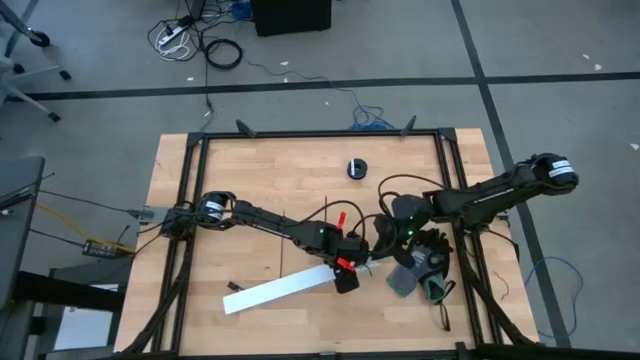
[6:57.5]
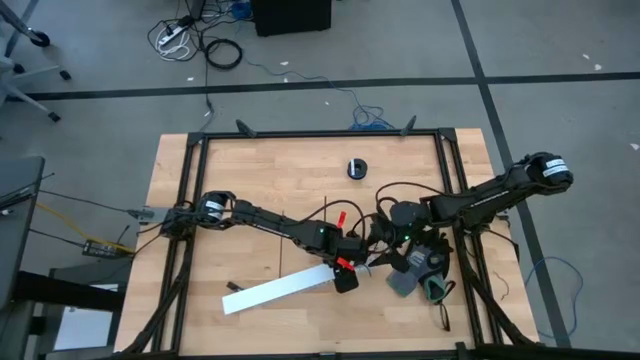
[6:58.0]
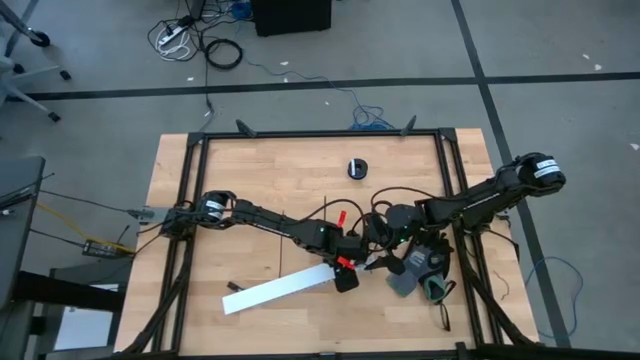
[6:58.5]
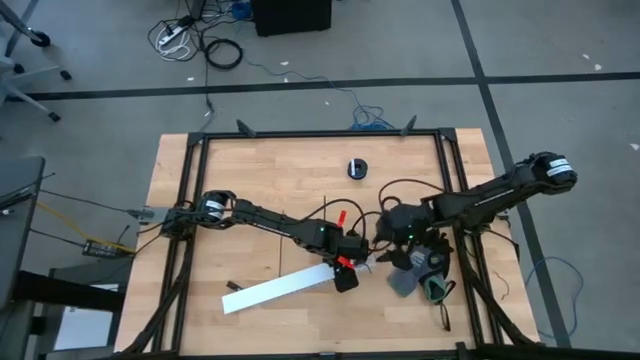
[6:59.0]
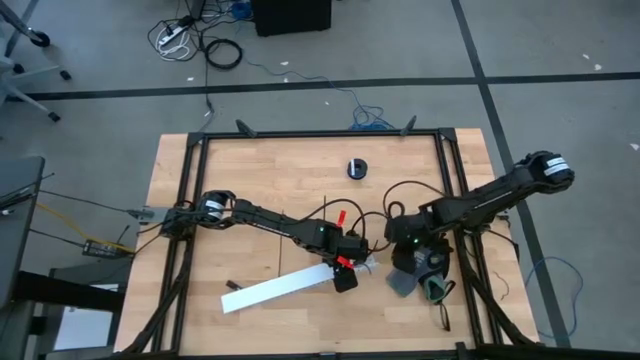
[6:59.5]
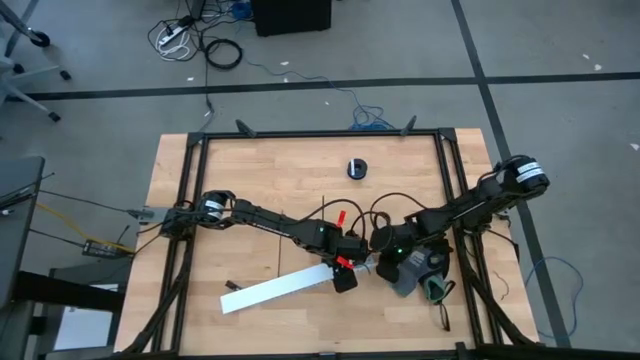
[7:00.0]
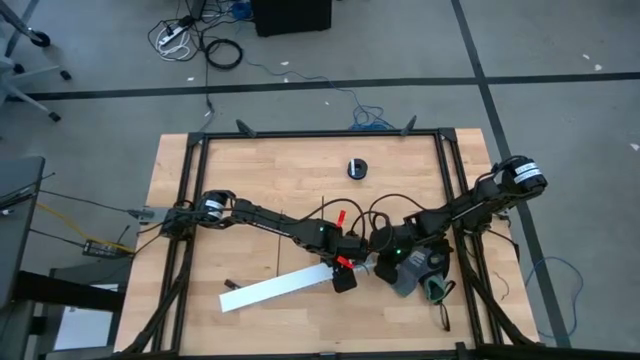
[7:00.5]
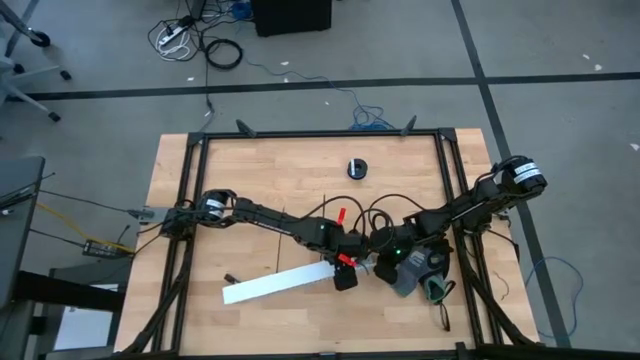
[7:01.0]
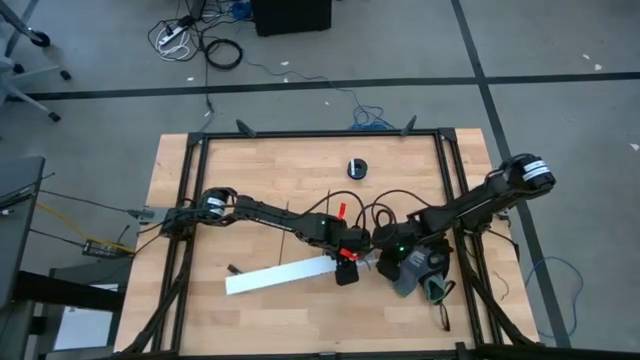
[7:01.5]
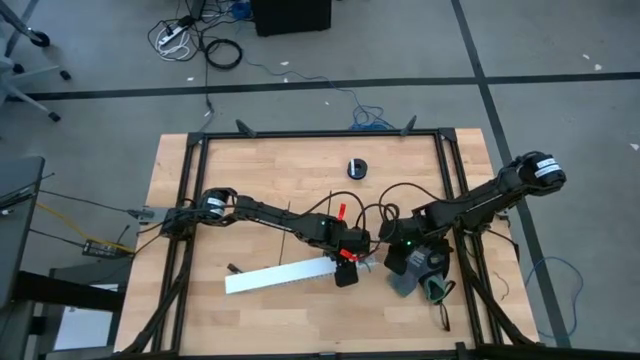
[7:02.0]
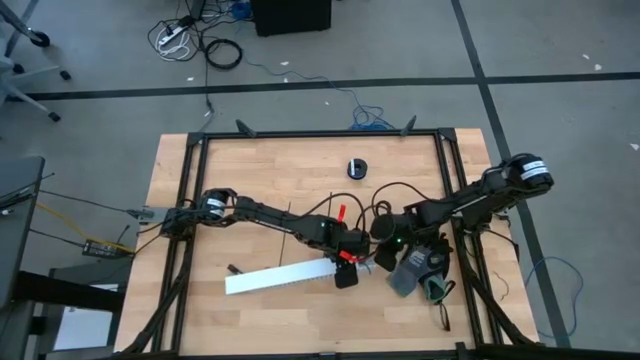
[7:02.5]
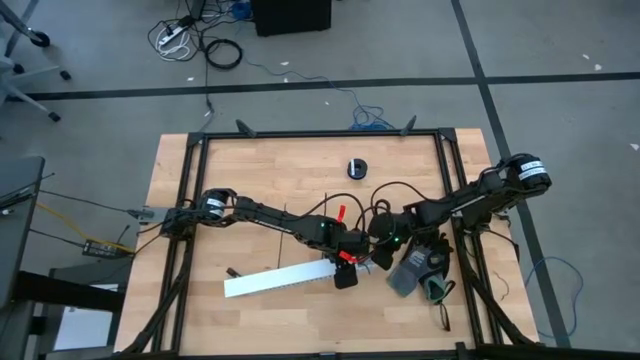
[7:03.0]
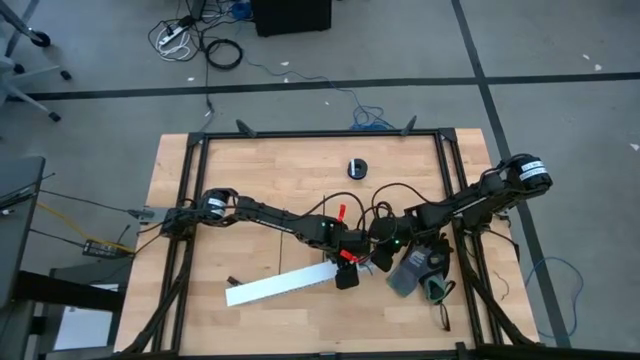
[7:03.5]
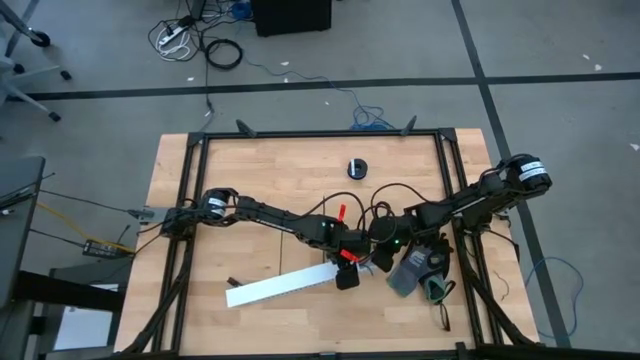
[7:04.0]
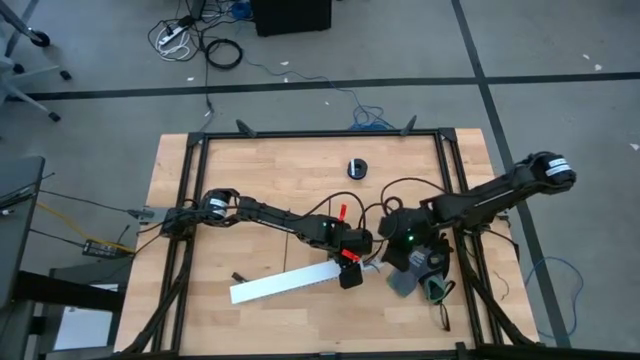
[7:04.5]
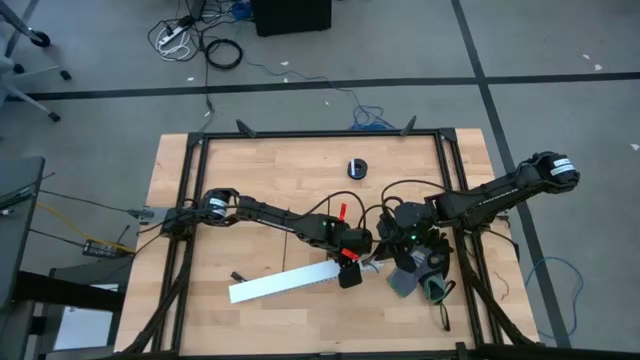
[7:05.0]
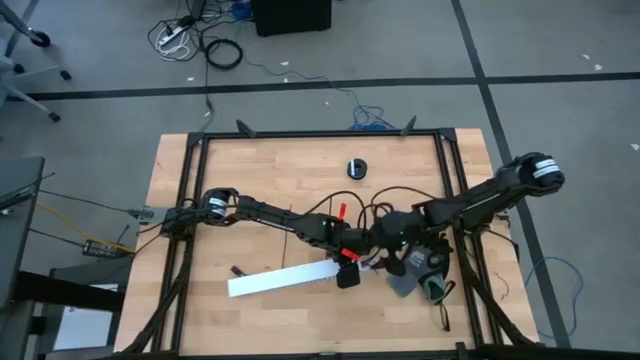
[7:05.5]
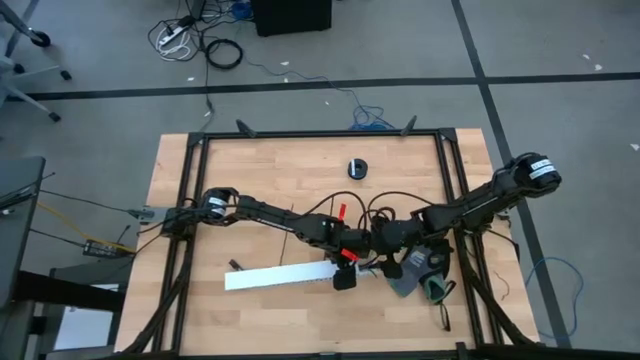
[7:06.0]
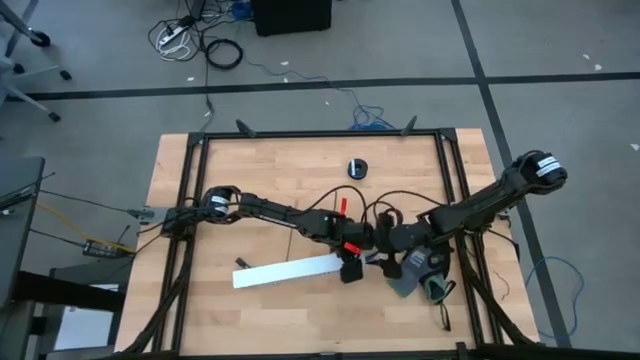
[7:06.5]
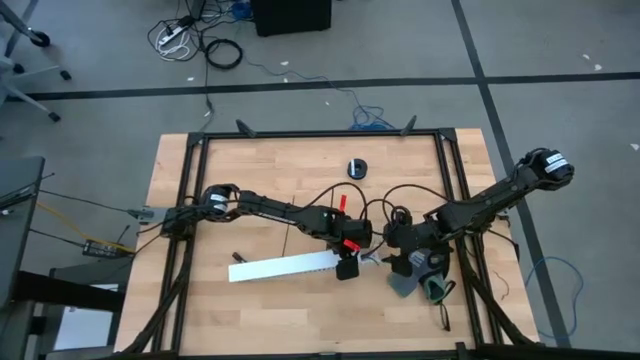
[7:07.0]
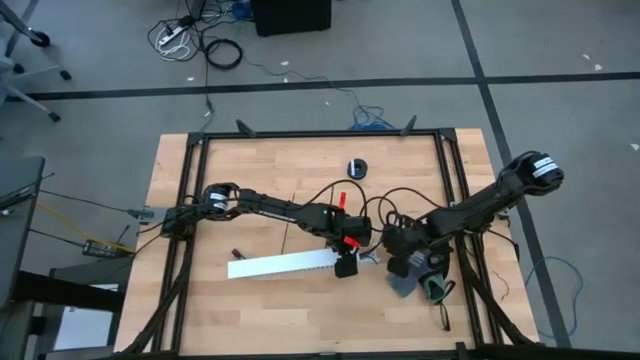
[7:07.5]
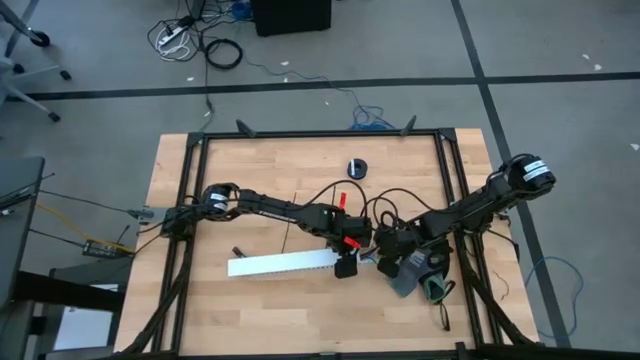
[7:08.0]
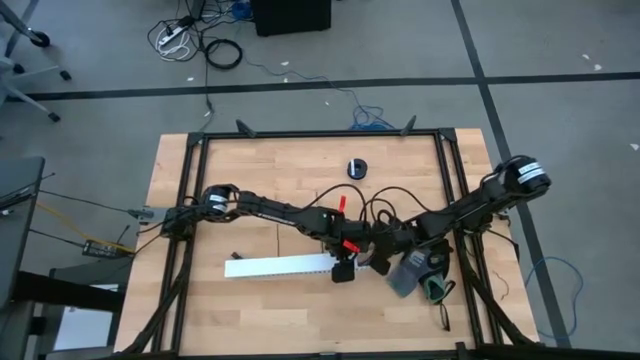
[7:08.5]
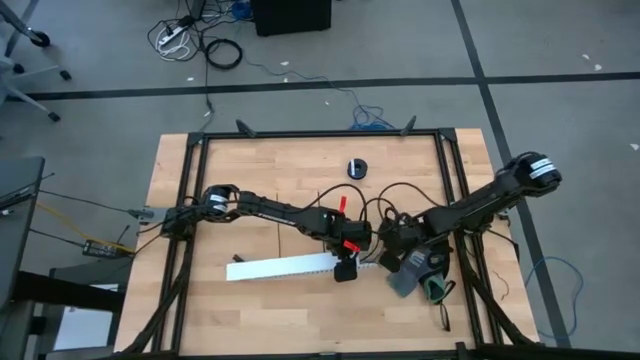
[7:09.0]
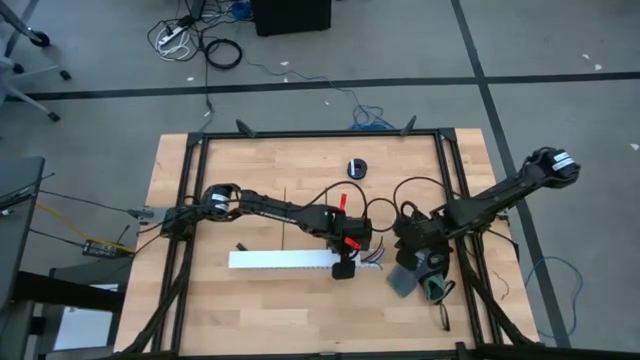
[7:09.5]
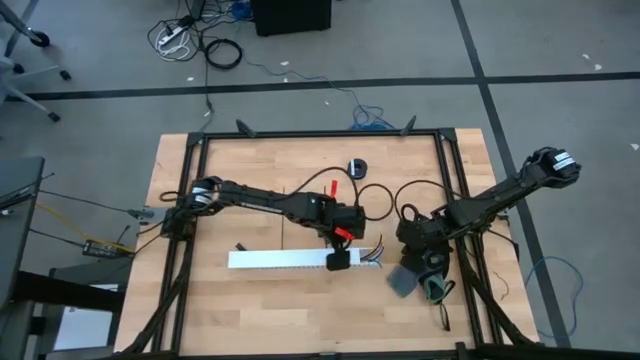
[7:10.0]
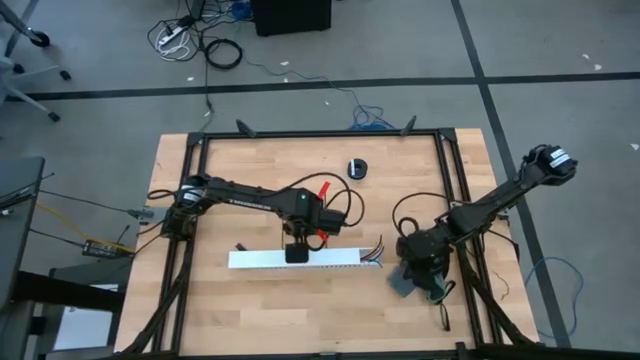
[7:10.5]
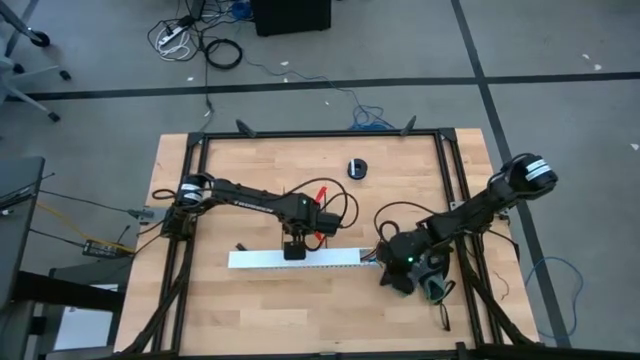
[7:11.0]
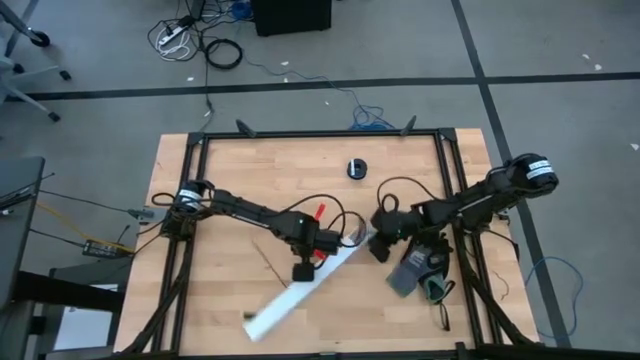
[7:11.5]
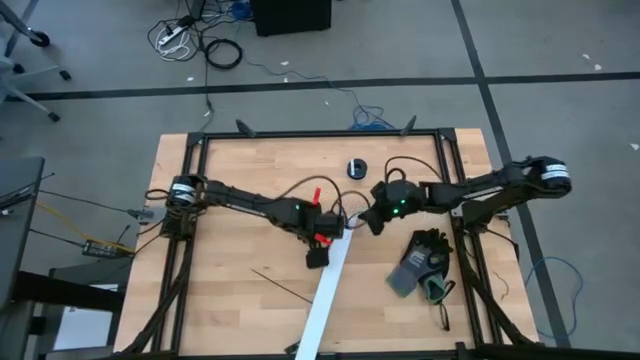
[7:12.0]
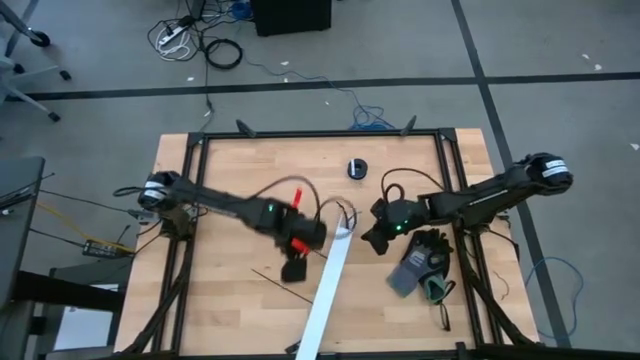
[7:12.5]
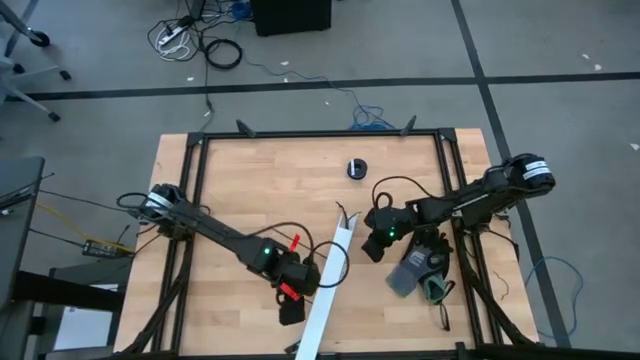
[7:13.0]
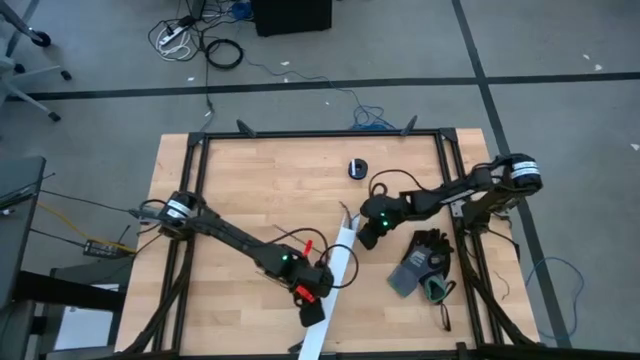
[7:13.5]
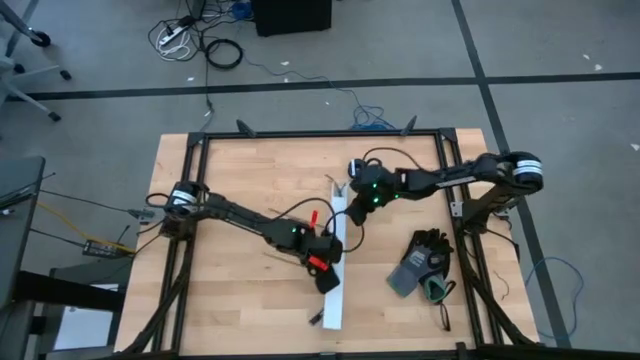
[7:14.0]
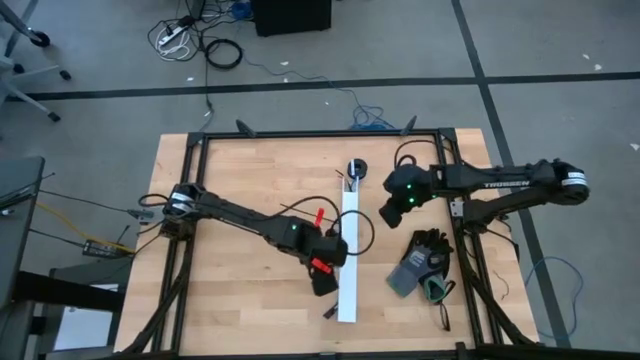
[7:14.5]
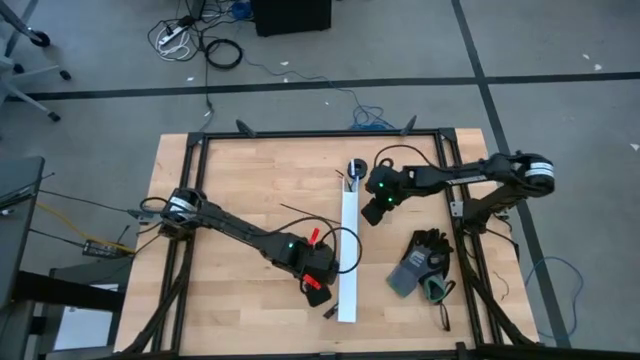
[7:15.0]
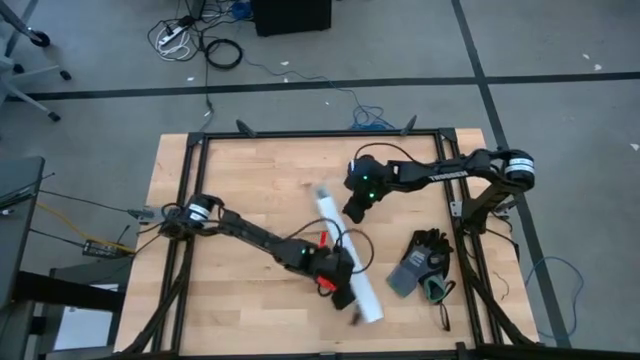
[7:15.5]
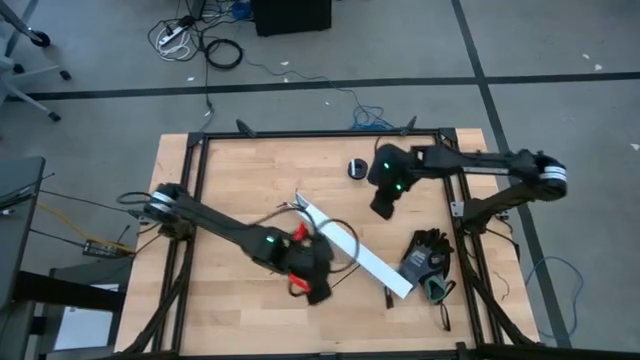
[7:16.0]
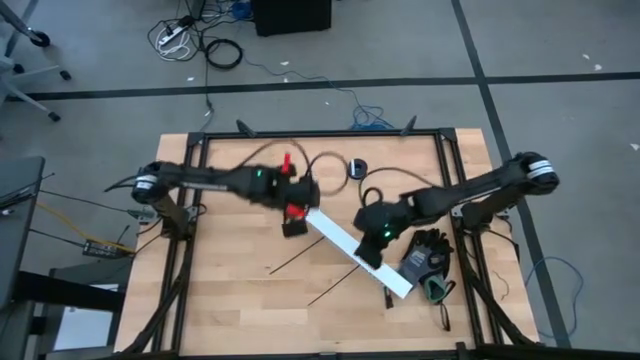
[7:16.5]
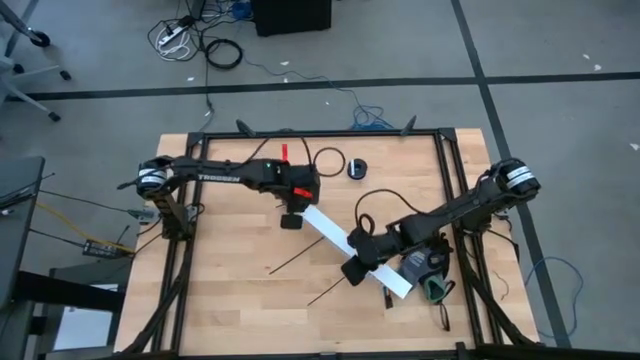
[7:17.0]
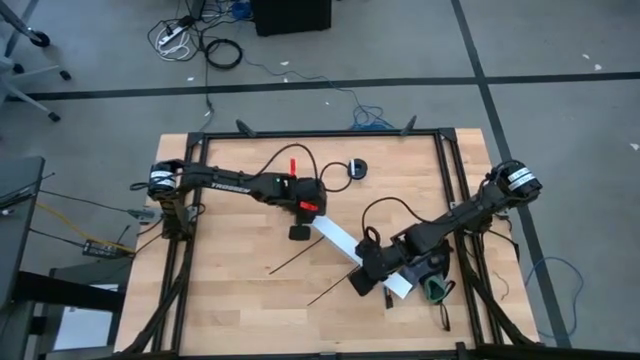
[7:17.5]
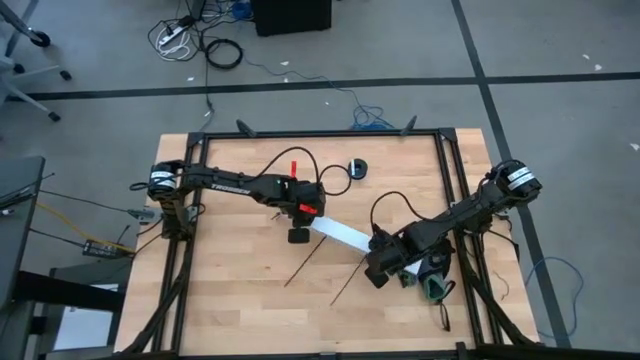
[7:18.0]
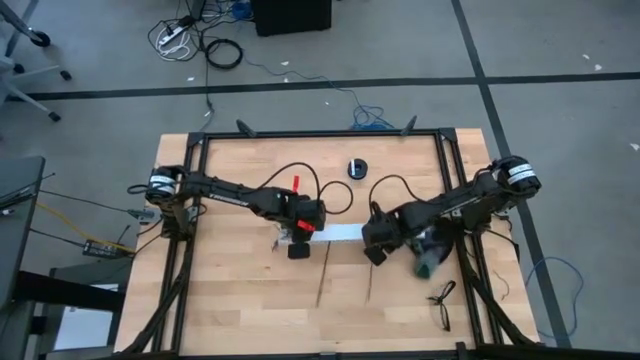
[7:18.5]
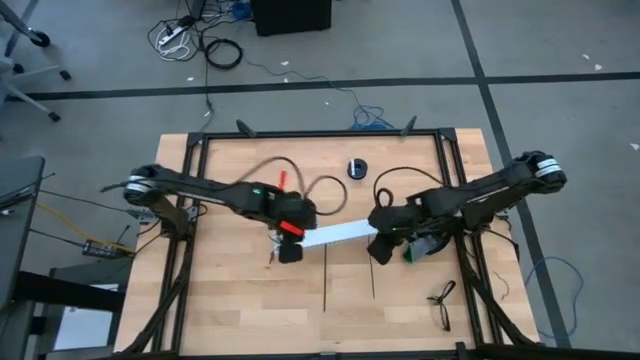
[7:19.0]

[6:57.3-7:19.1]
Task: Ziptie cables
Close the white cable duct
